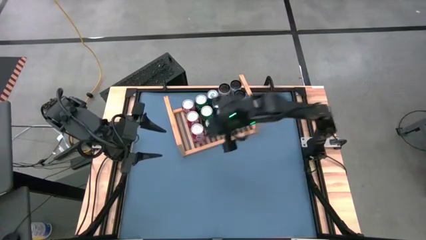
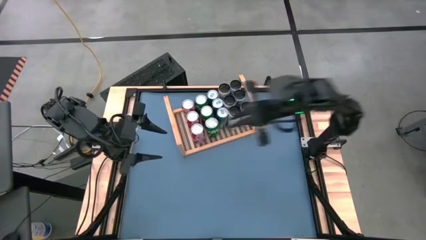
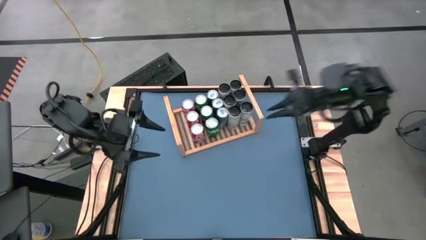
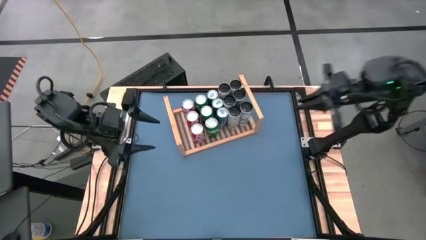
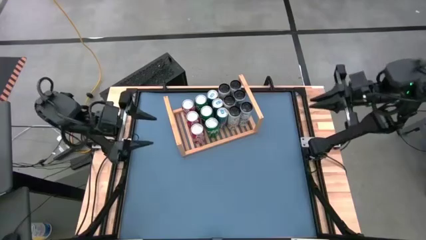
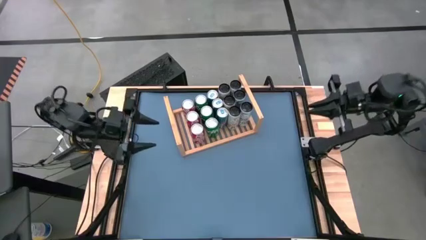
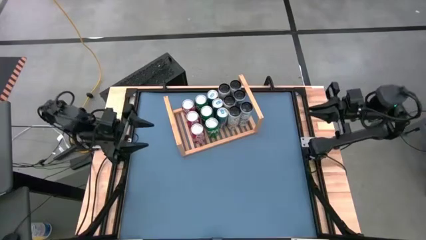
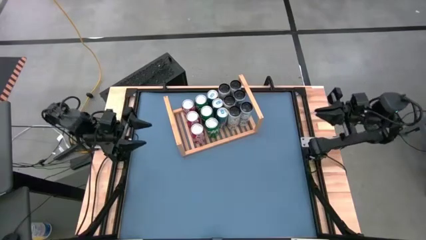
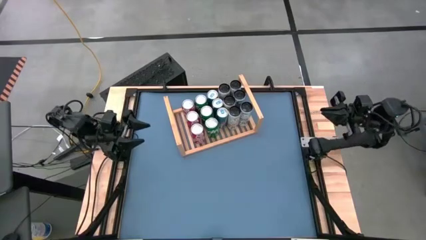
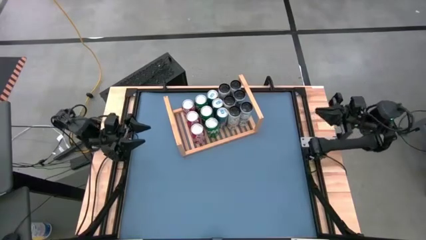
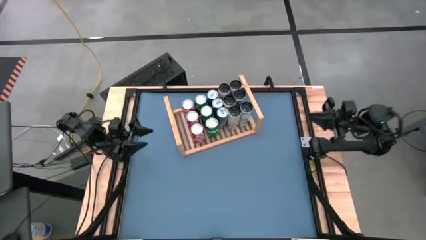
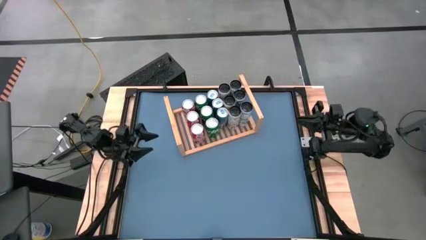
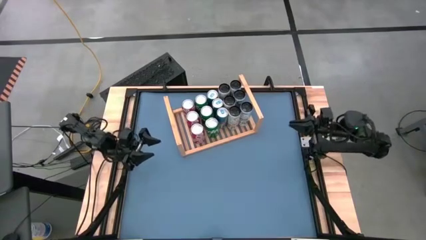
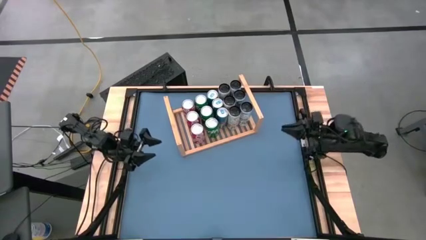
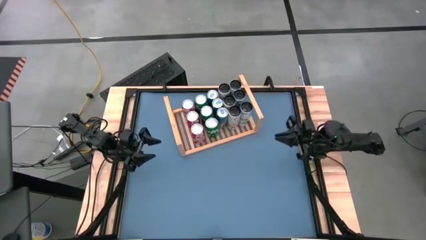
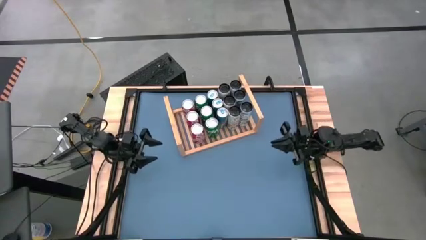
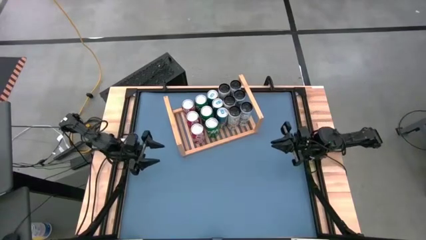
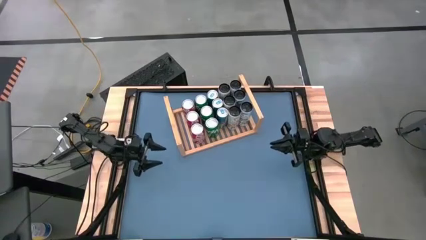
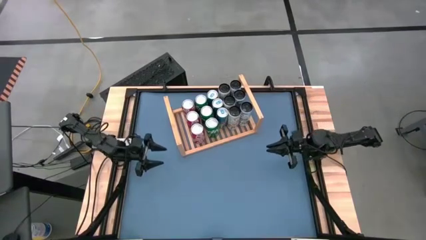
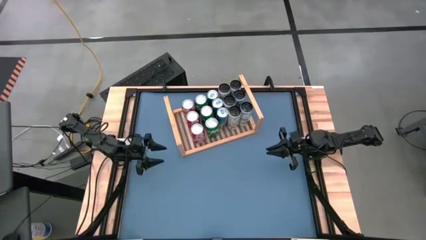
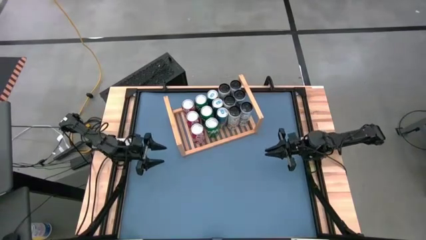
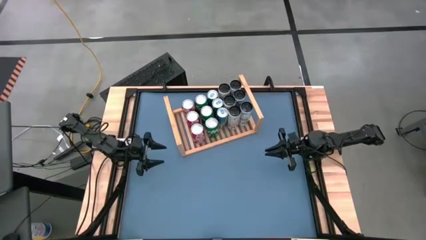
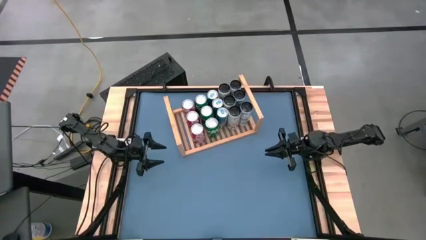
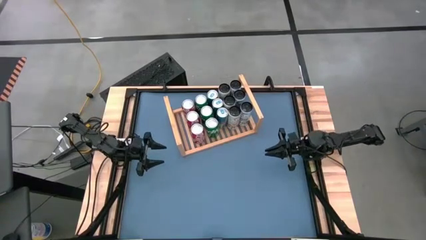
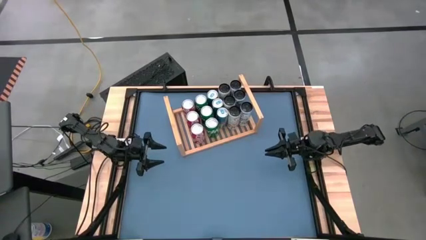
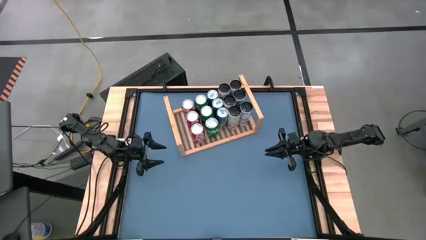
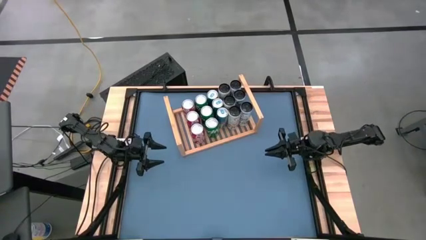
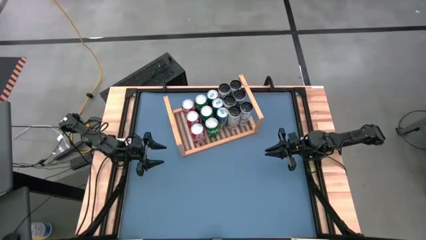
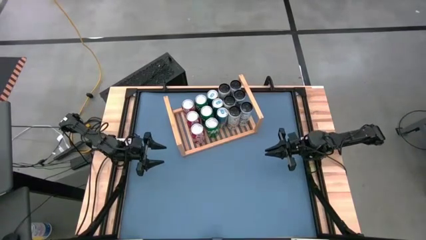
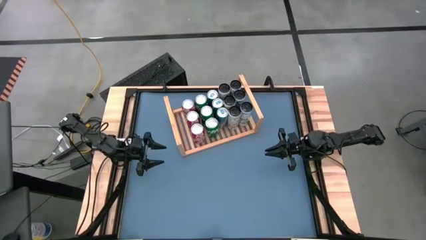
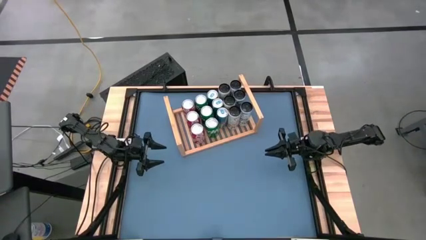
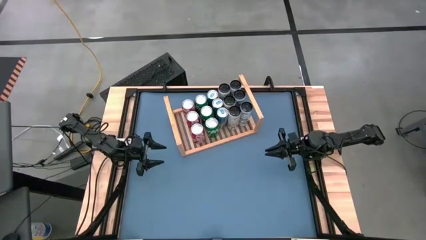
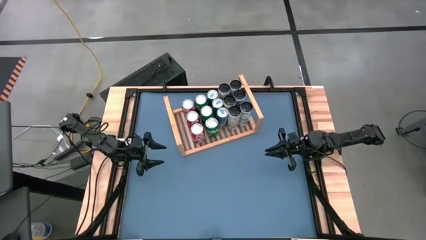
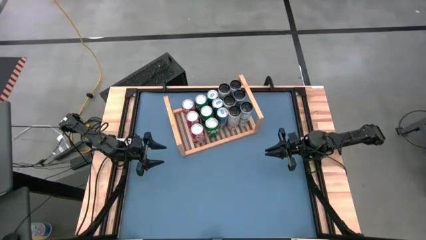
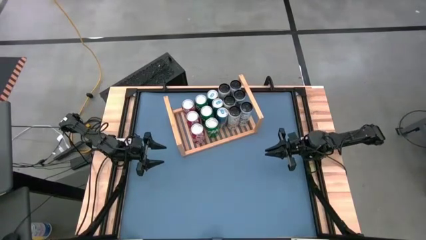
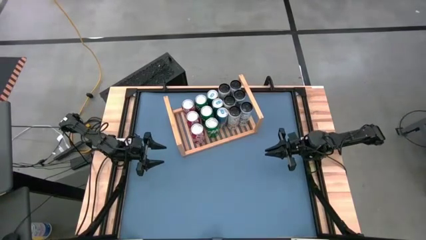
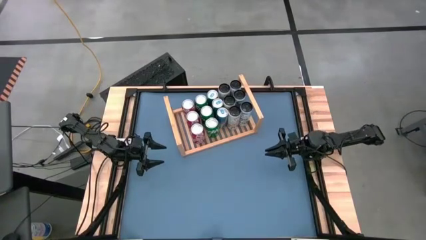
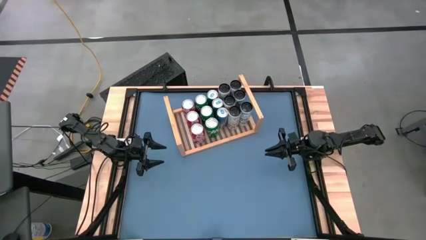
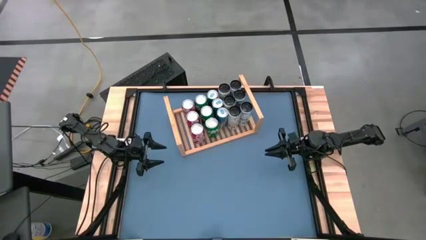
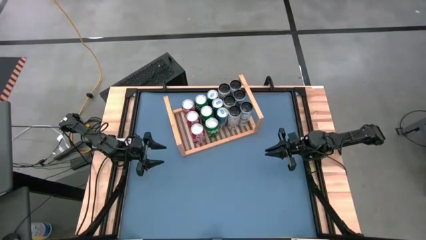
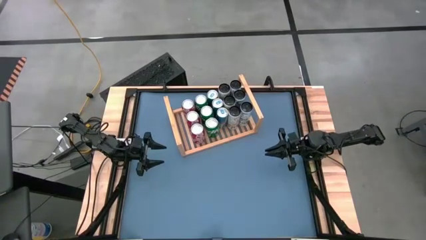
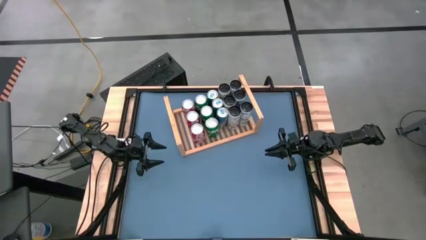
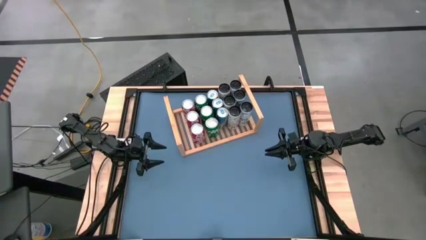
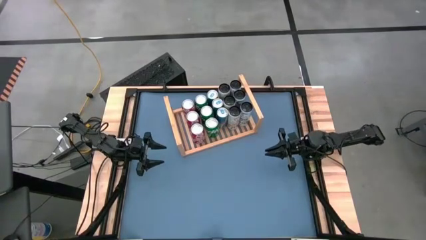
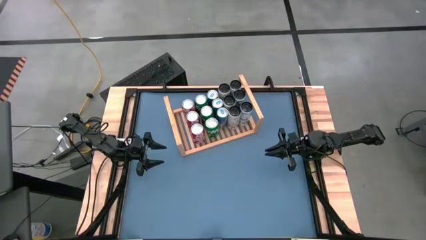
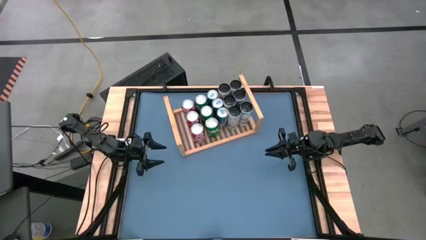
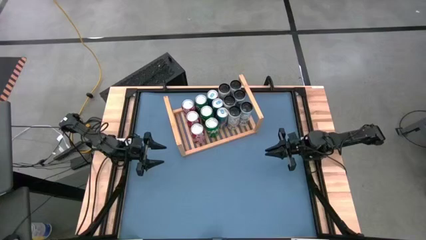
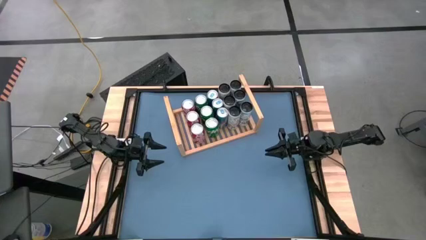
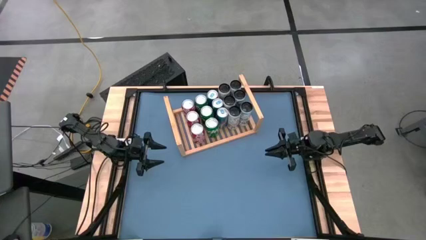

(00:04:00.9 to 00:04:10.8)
Task: Place canned beverage on shelf
Return to Home Position
